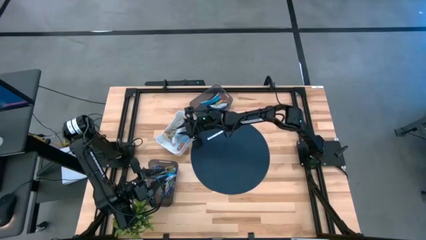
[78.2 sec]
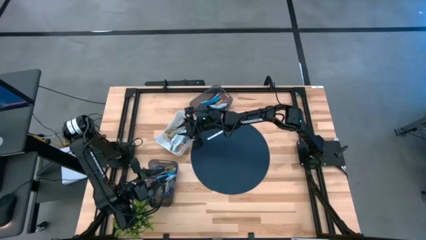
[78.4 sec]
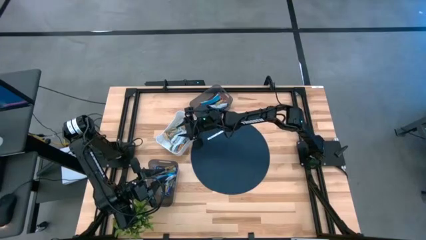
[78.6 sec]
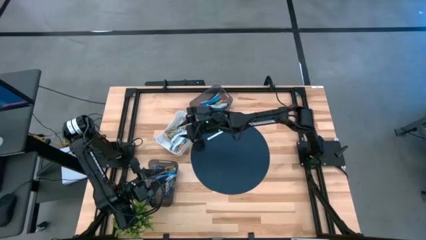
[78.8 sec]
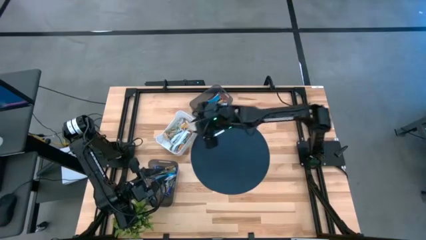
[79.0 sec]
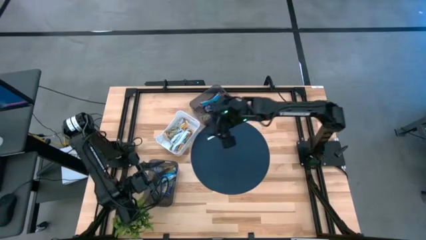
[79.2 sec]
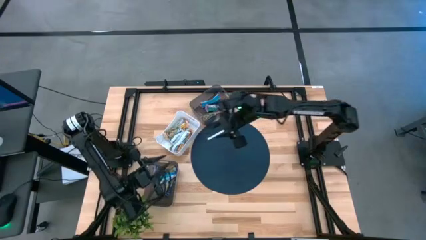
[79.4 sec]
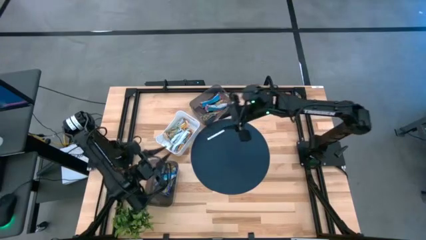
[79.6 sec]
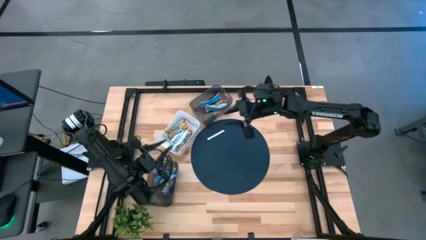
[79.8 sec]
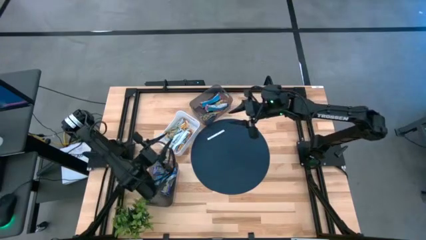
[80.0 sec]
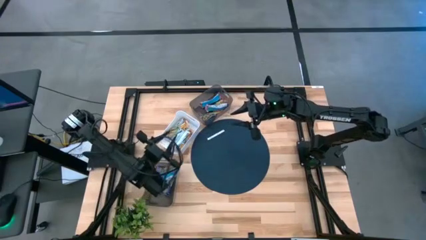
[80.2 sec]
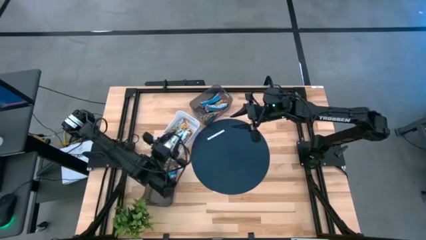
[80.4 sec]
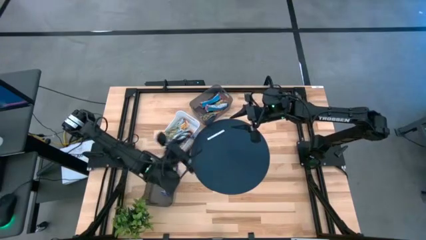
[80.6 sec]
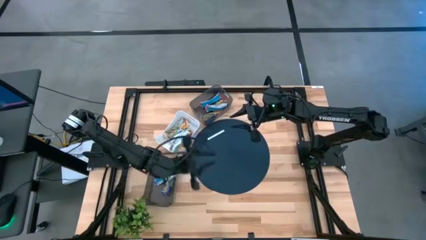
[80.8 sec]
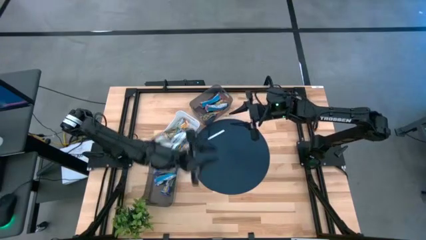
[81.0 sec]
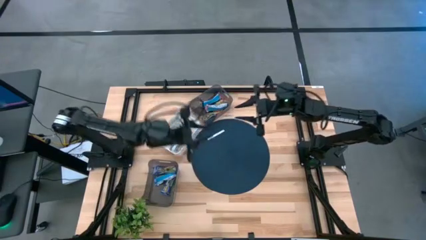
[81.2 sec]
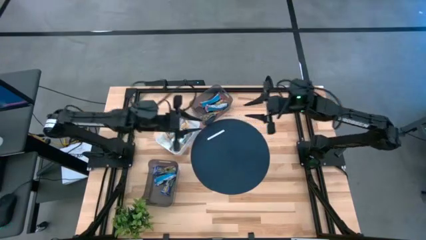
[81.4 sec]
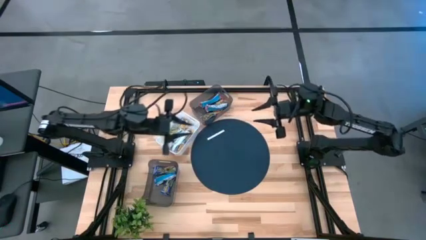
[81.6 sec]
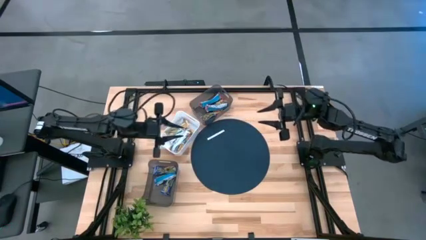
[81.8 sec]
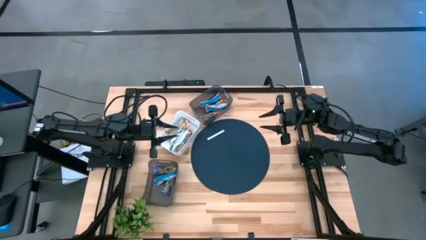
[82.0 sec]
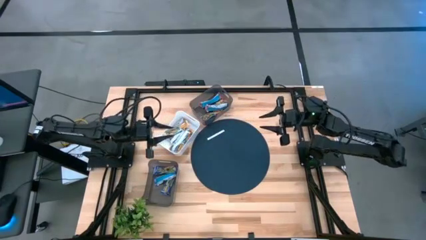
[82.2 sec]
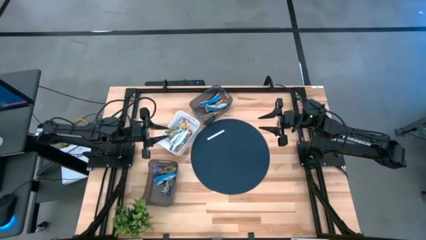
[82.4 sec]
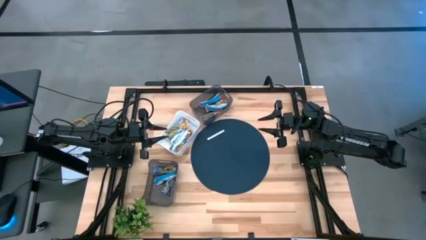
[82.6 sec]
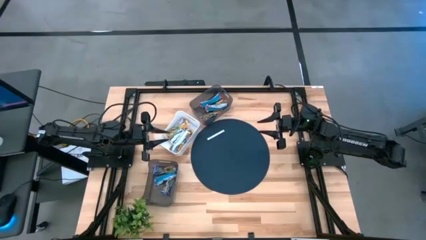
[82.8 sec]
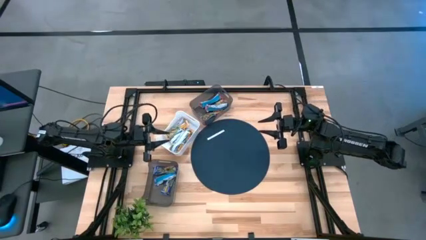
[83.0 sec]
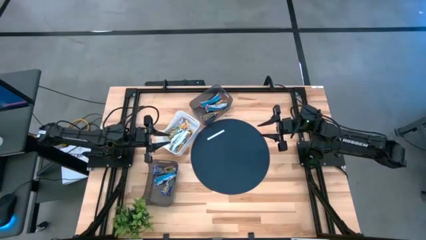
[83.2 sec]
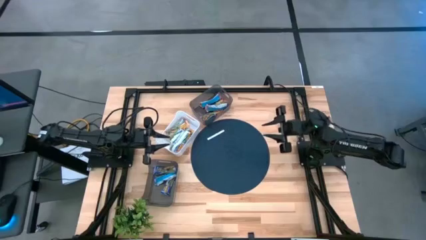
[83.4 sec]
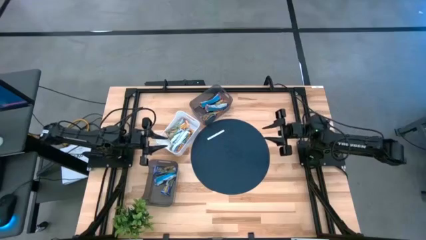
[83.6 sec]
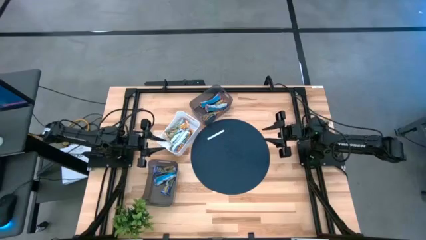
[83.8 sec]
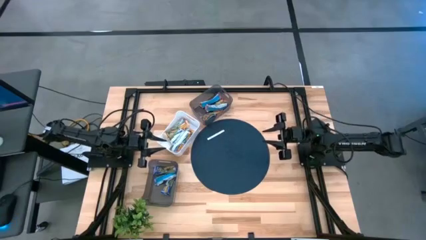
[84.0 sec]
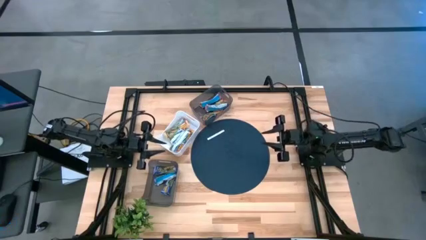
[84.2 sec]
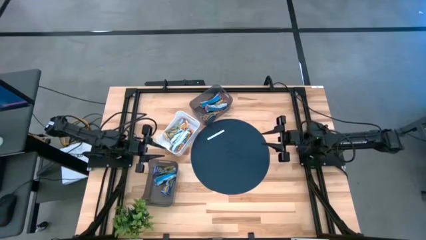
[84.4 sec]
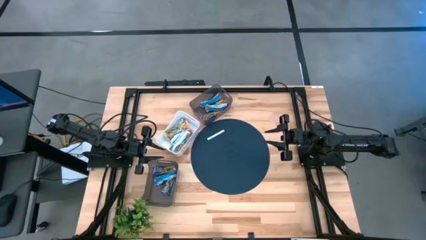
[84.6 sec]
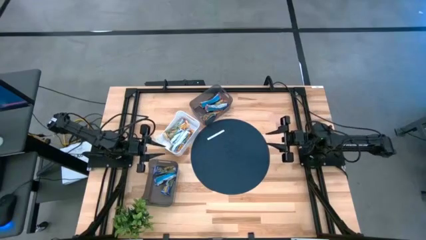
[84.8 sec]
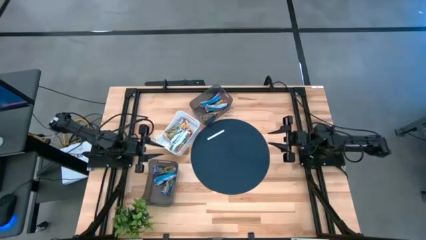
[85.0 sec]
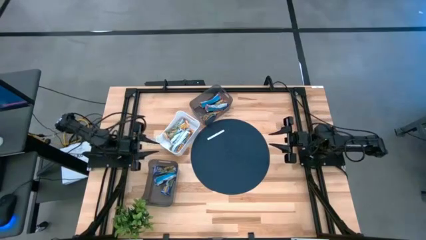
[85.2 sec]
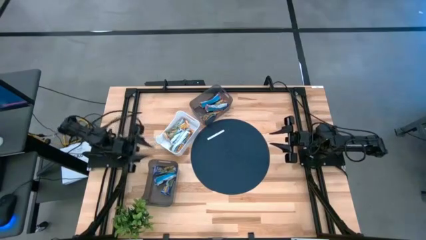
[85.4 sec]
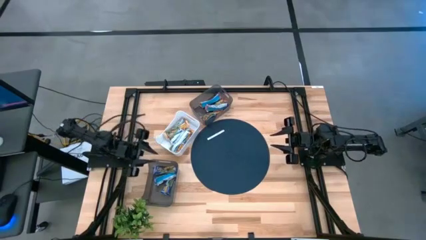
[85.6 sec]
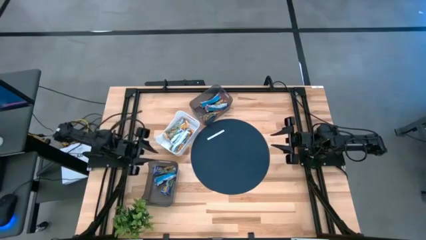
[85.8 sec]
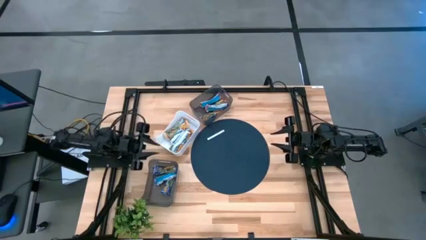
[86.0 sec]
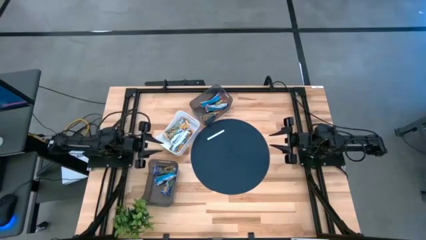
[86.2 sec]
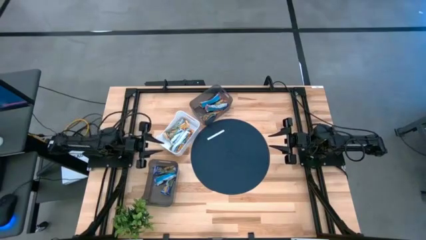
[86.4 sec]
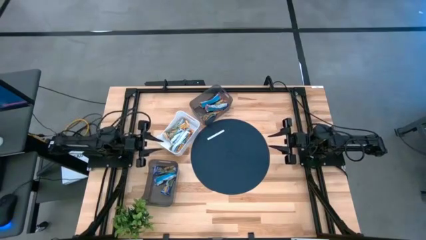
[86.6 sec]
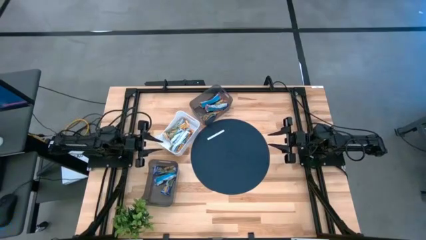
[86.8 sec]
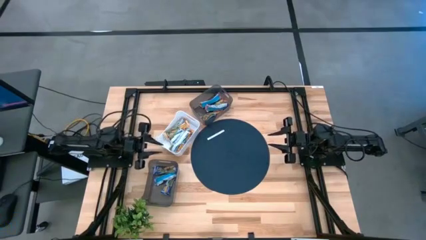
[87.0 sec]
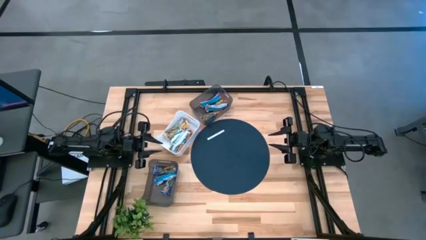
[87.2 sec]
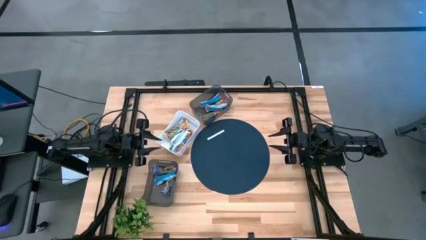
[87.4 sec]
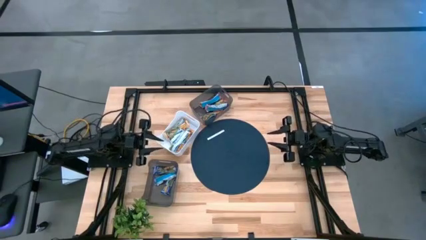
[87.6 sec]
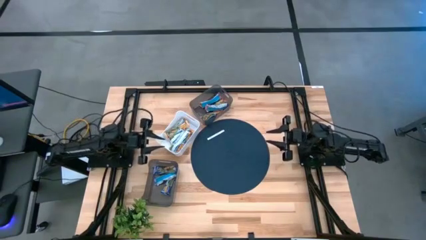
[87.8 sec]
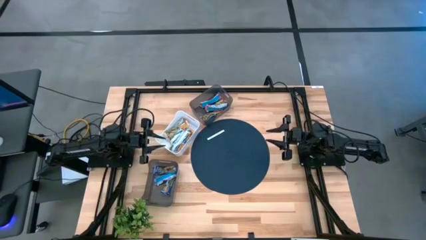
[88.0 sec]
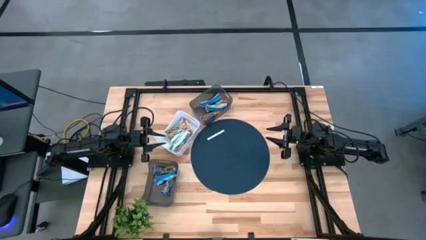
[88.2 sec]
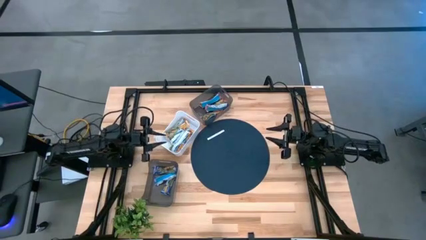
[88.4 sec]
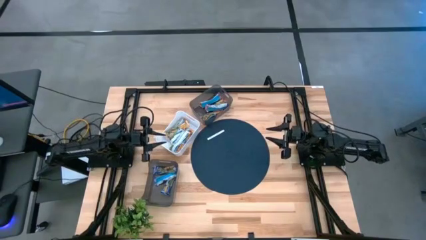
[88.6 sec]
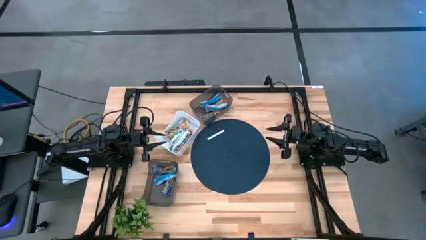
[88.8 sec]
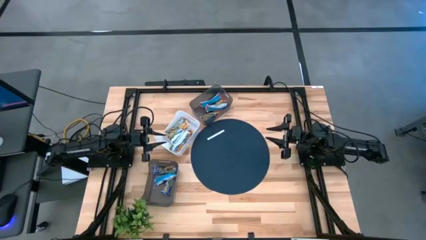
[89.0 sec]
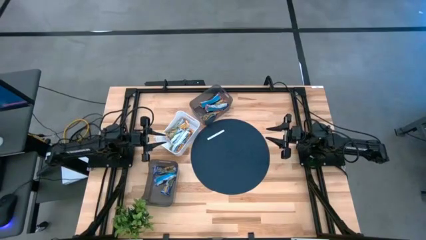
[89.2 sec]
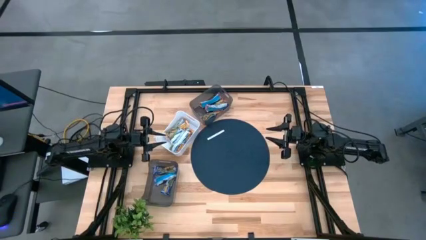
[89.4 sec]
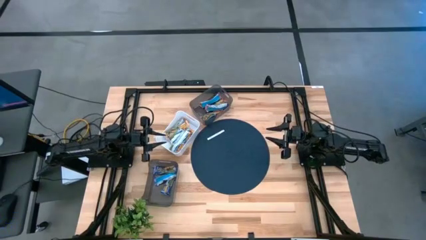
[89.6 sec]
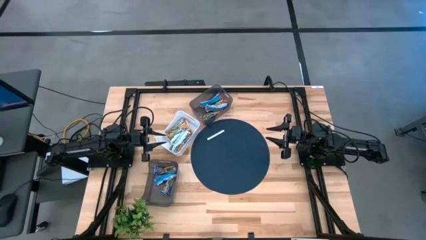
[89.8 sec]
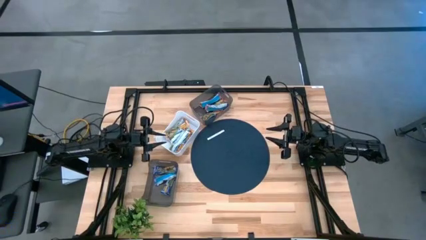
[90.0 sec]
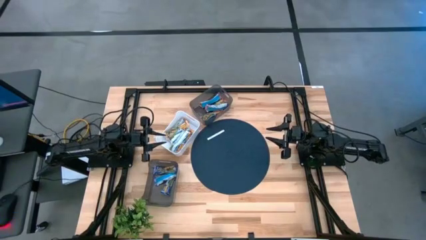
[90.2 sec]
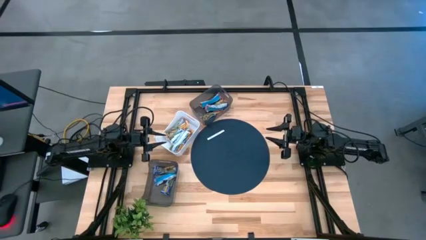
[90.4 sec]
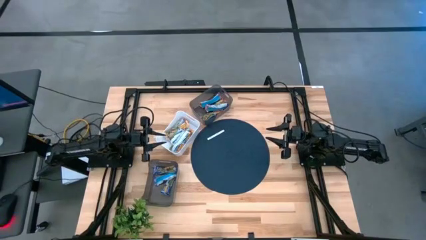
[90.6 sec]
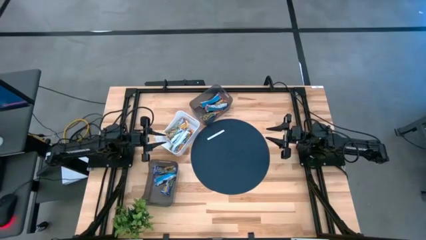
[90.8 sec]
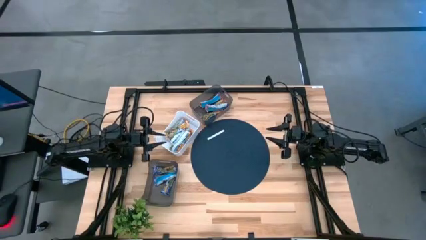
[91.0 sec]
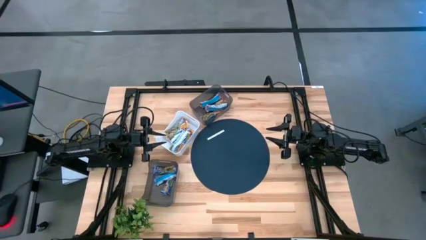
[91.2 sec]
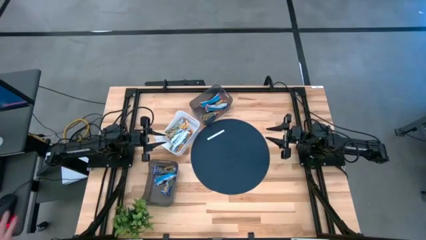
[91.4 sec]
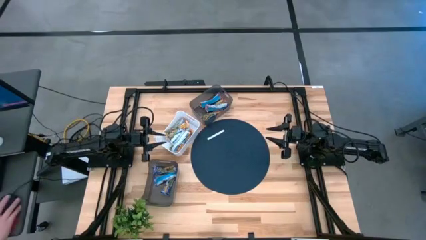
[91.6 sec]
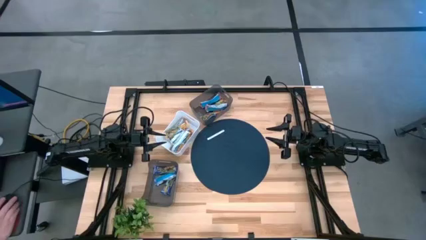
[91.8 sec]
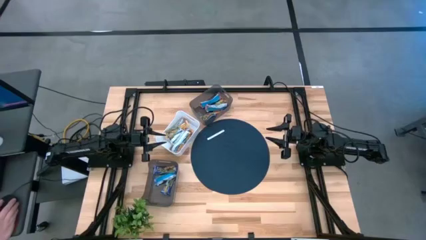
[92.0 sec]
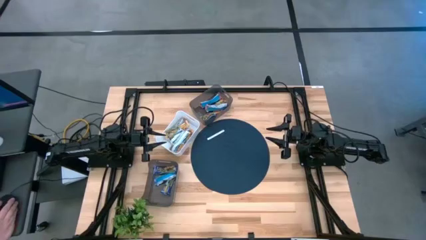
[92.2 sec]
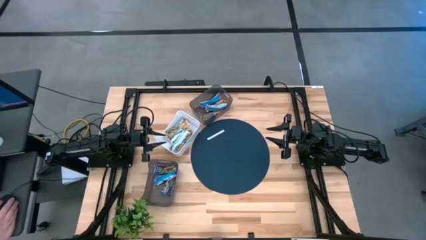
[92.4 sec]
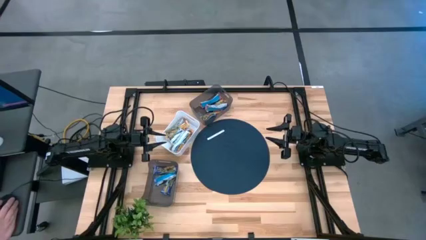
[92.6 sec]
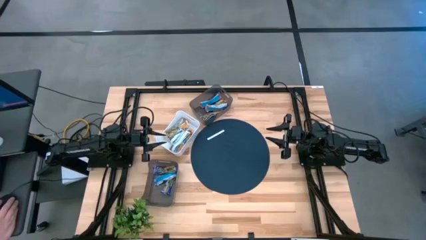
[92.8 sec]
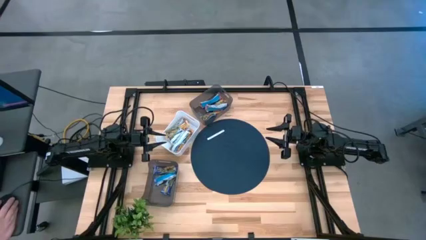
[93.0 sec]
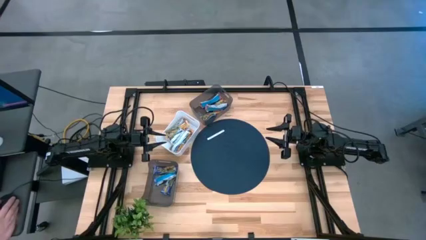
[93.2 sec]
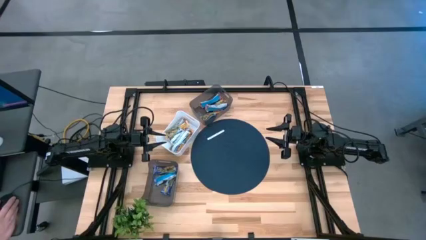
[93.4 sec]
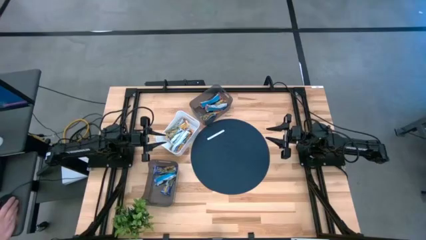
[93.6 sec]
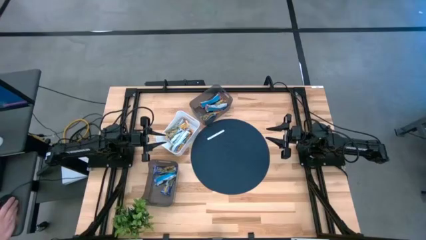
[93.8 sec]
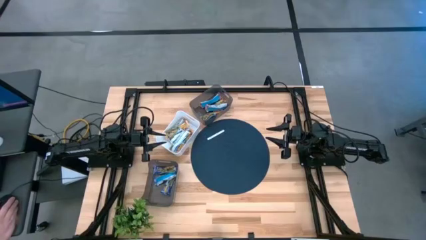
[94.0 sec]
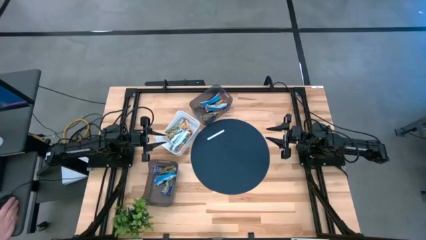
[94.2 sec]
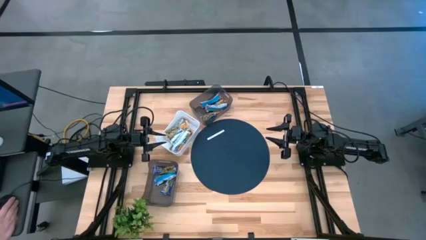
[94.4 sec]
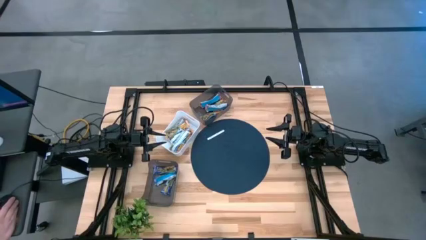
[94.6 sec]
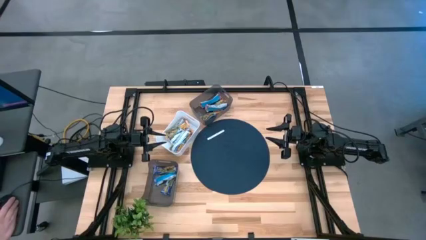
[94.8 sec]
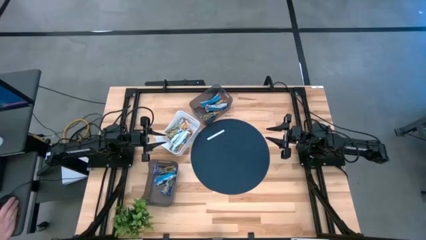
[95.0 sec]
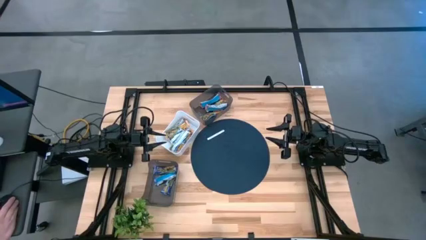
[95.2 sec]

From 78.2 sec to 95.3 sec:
Task: Pick and place Granola Bars by type
Return to Home Position
